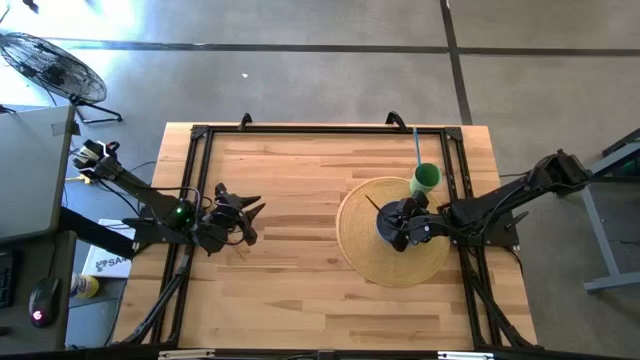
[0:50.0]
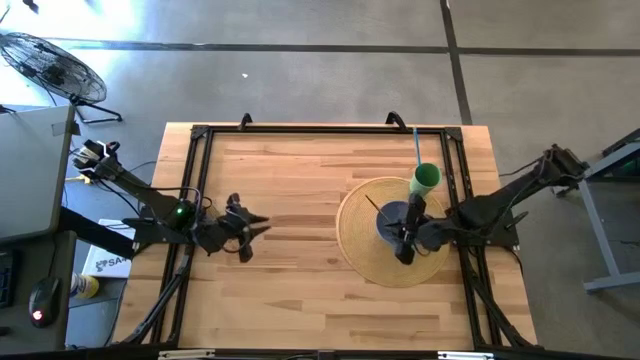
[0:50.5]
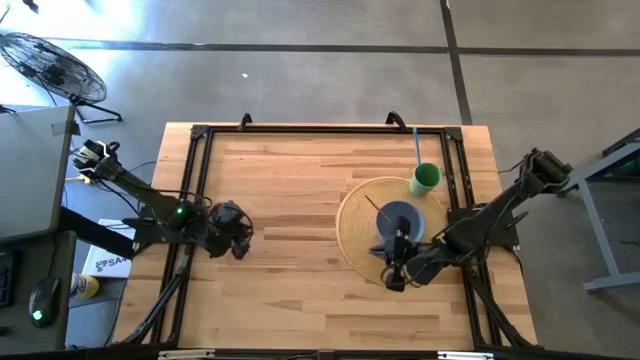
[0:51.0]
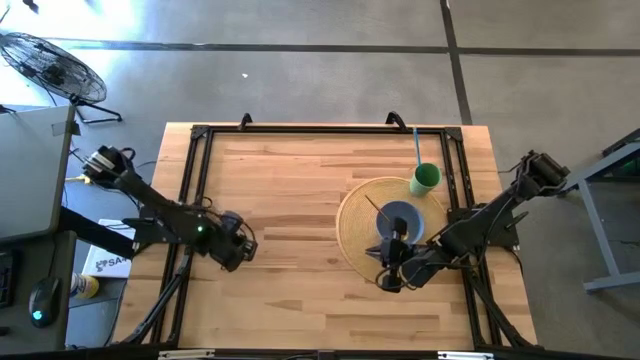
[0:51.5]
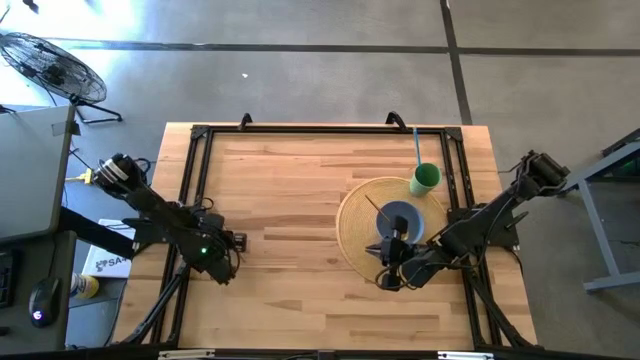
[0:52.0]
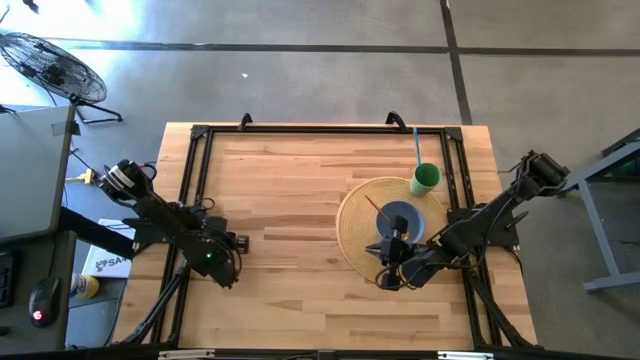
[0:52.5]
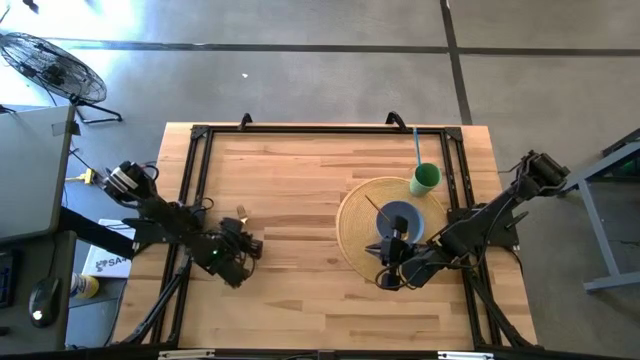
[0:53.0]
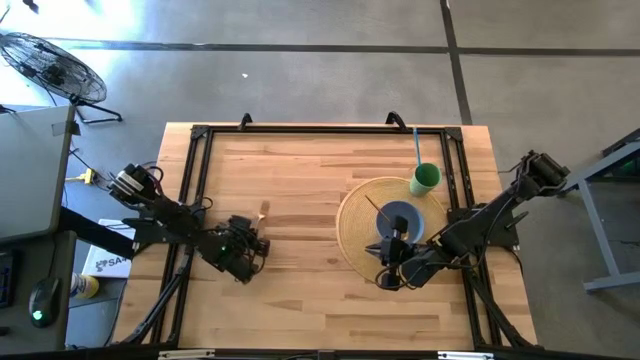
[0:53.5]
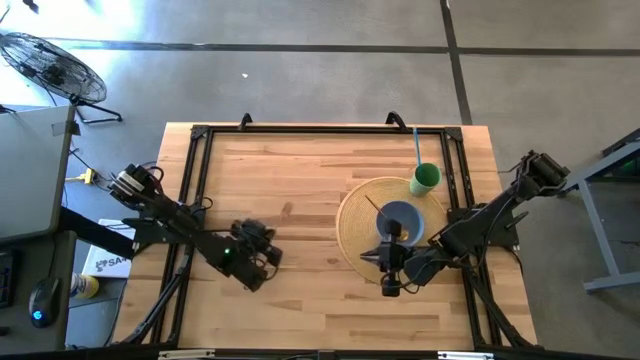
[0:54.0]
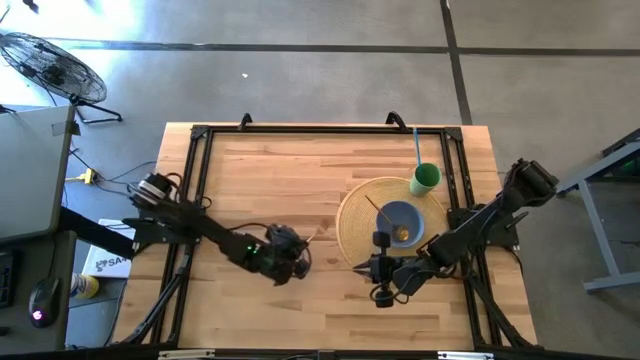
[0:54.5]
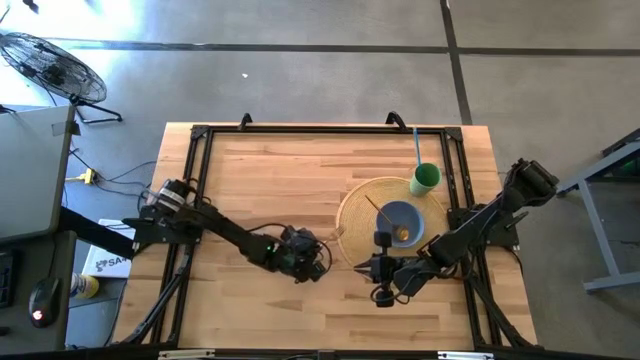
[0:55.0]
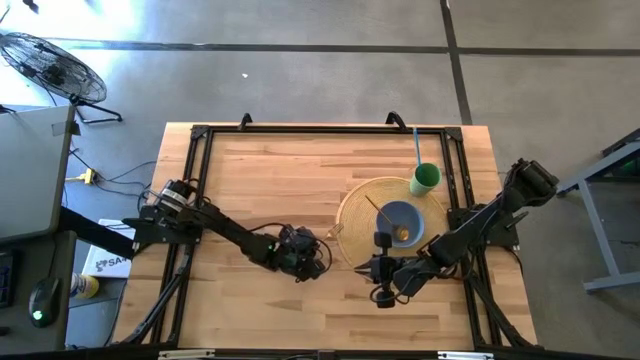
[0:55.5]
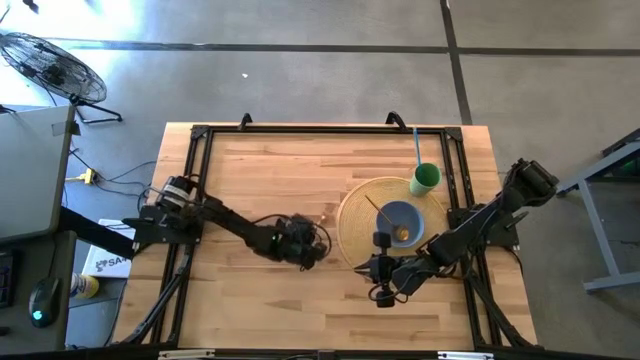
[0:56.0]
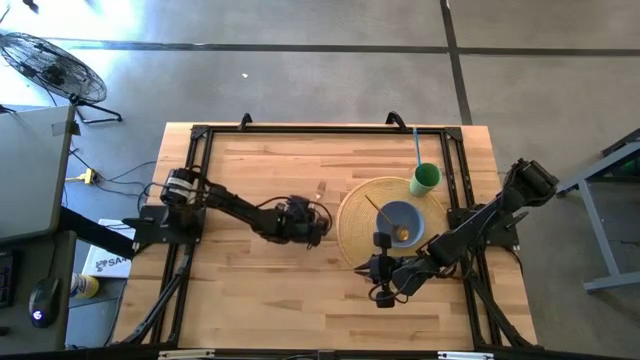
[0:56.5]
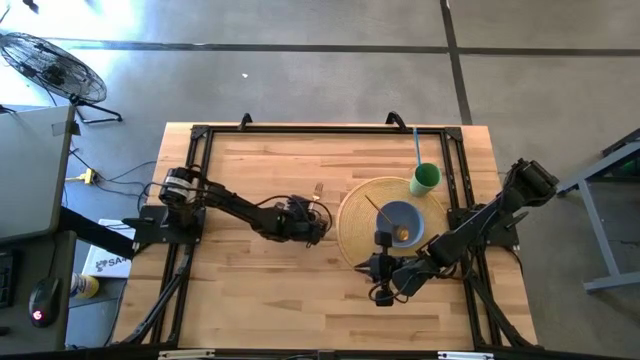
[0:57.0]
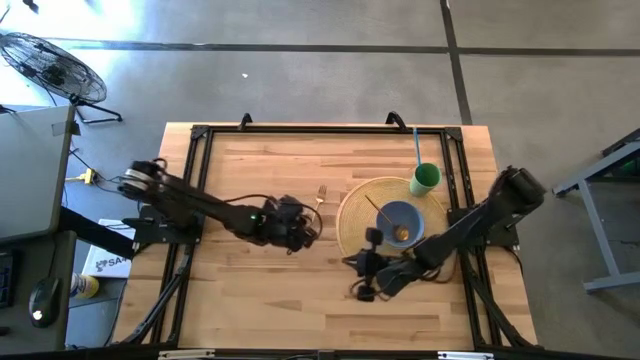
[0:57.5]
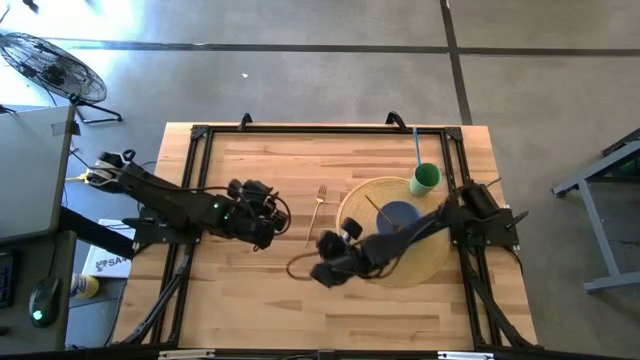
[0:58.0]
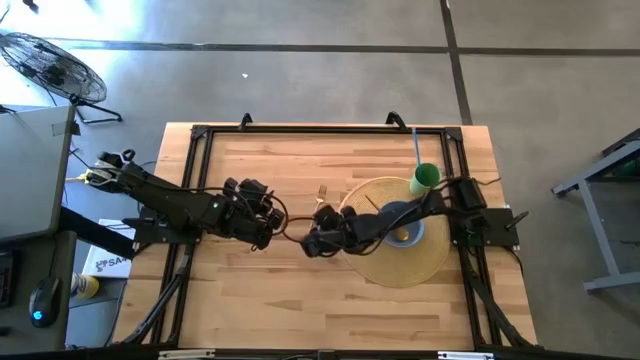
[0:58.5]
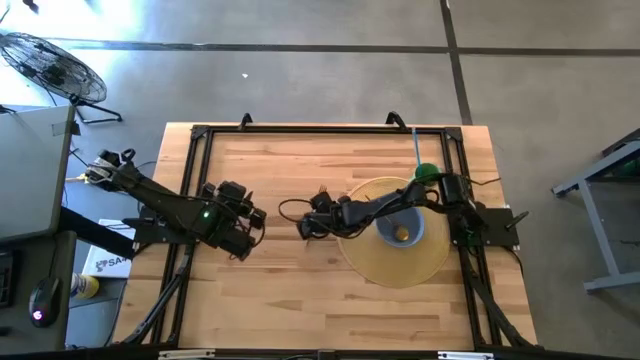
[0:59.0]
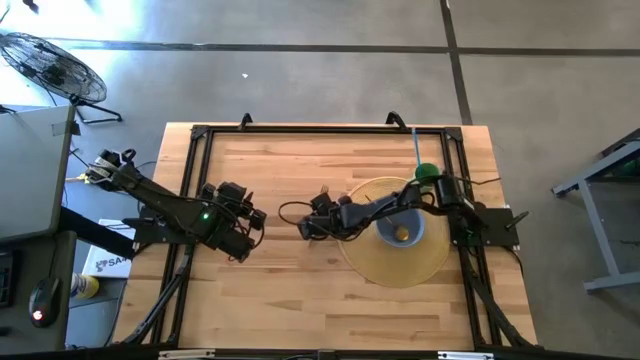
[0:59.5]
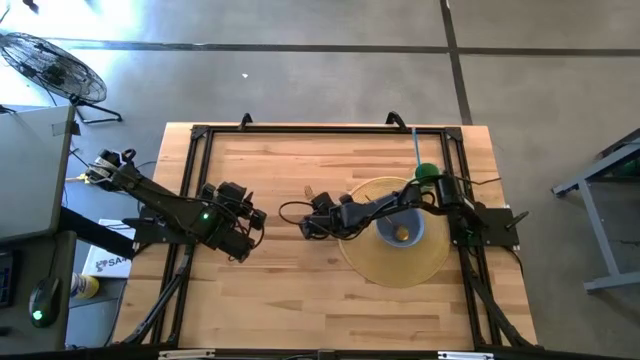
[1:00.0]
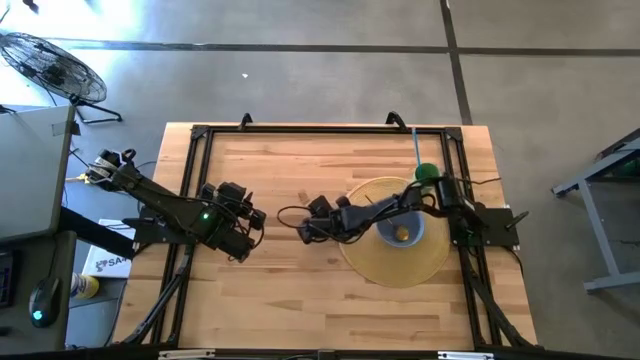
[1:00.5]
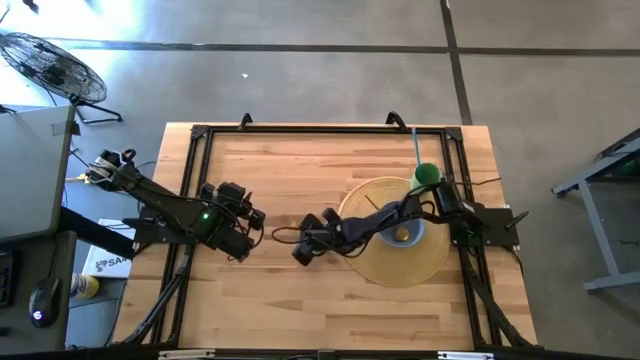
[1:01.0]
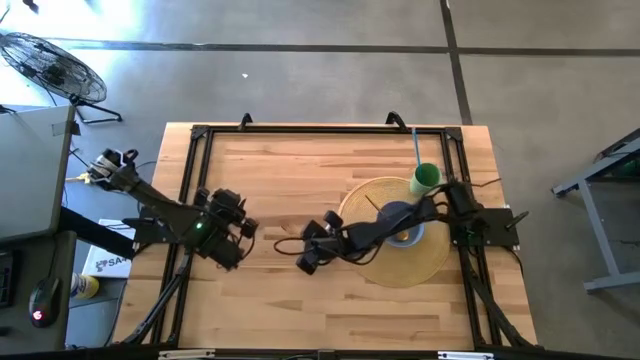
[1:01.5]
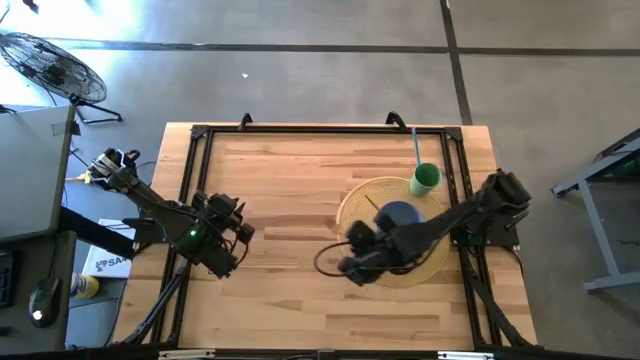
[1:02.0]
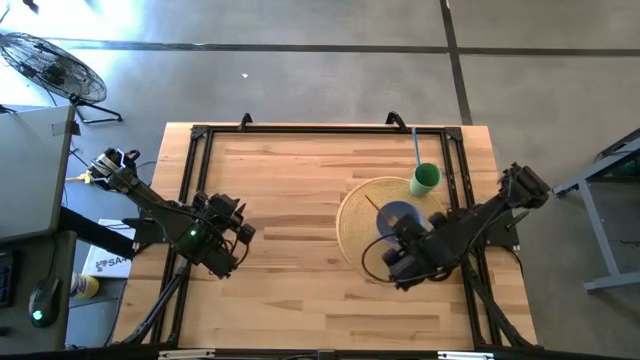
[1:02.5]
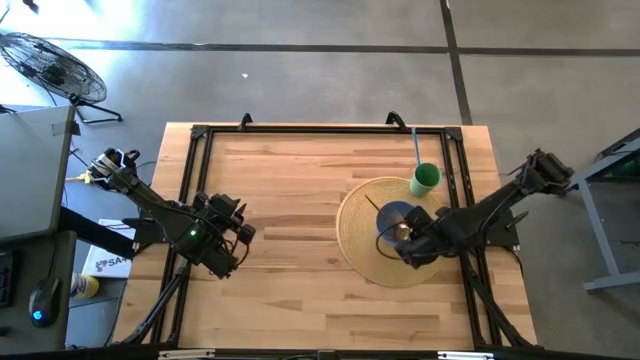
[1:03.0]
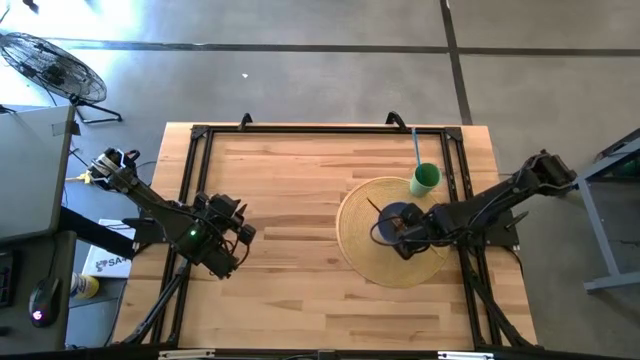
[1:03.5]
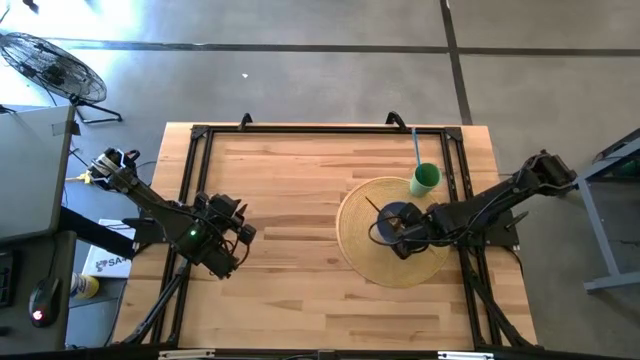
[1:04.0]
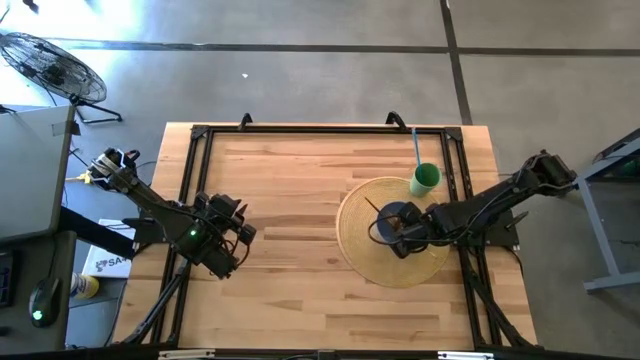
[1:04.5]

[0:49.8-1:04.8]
Task: Pick & Place Utensil
Put the fork into the blue bowl

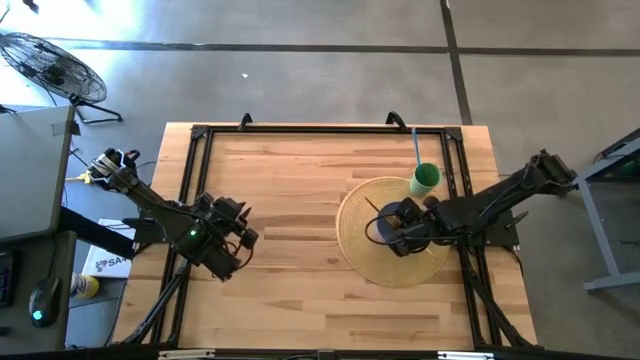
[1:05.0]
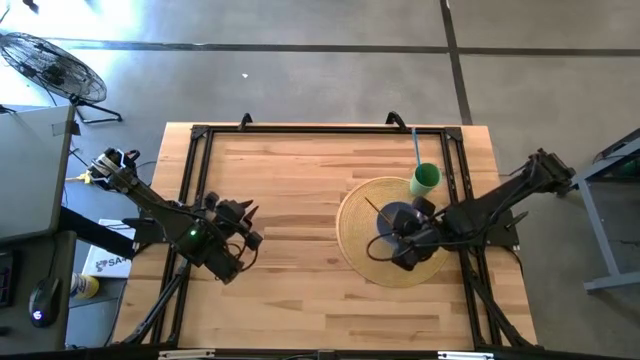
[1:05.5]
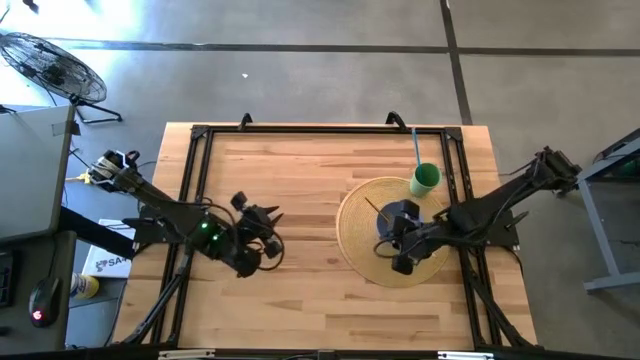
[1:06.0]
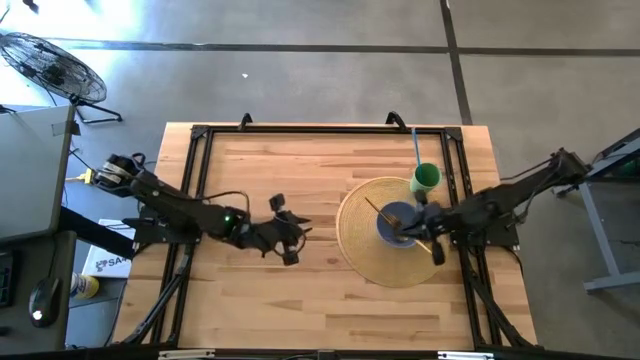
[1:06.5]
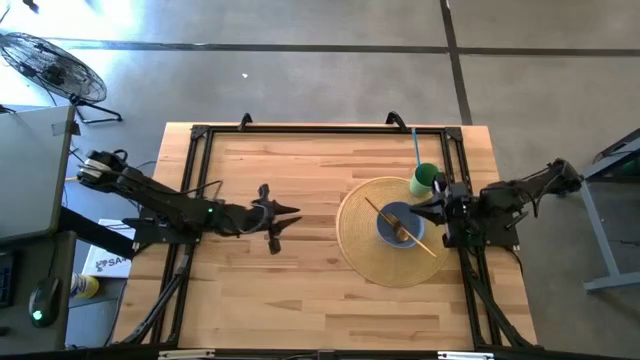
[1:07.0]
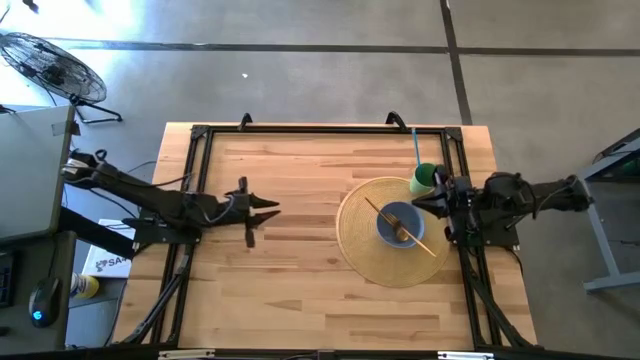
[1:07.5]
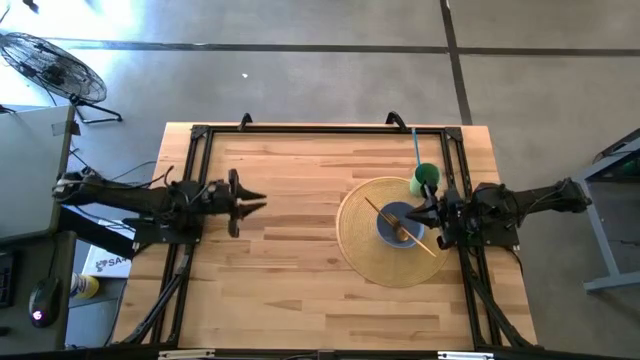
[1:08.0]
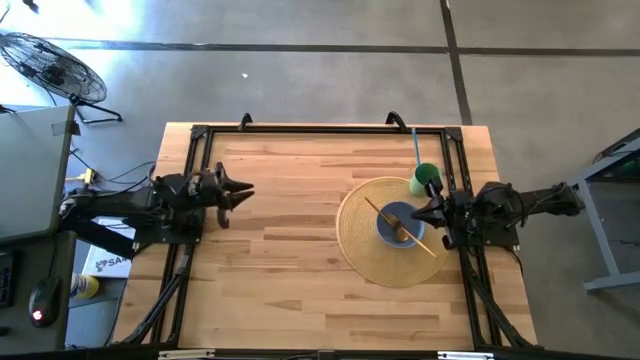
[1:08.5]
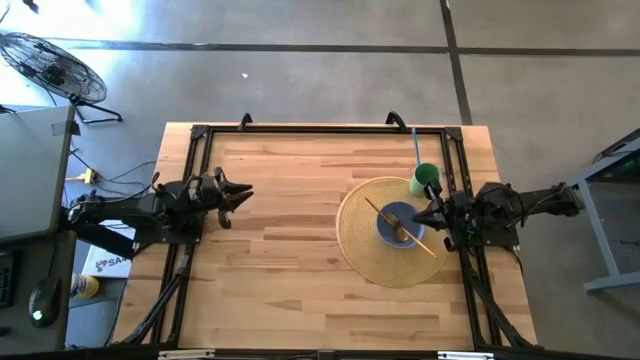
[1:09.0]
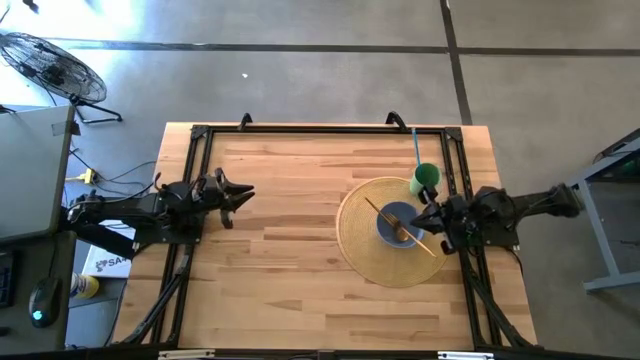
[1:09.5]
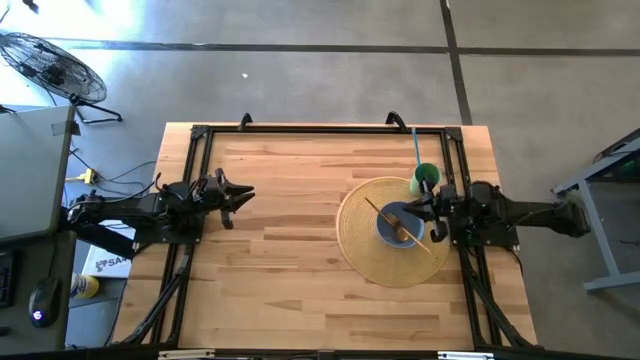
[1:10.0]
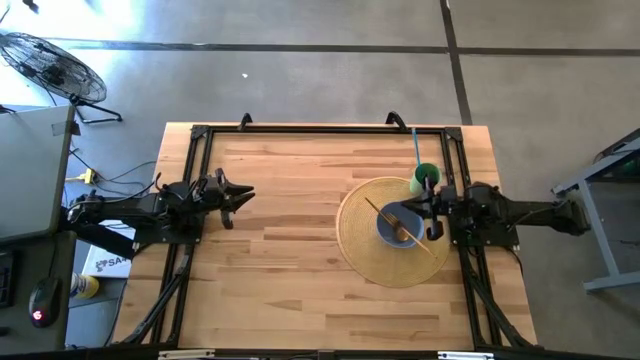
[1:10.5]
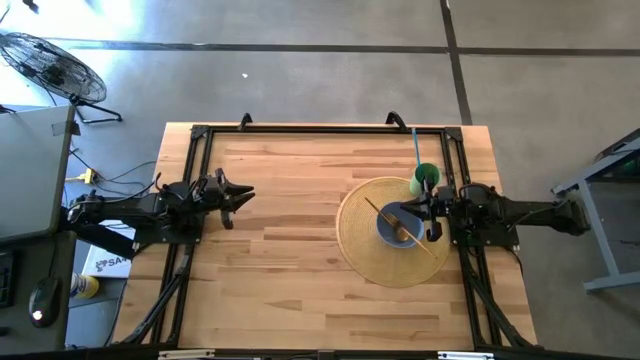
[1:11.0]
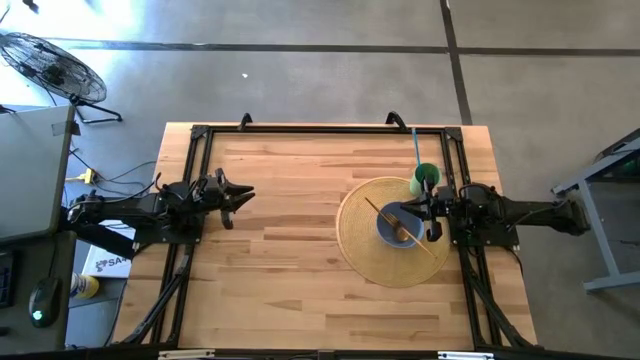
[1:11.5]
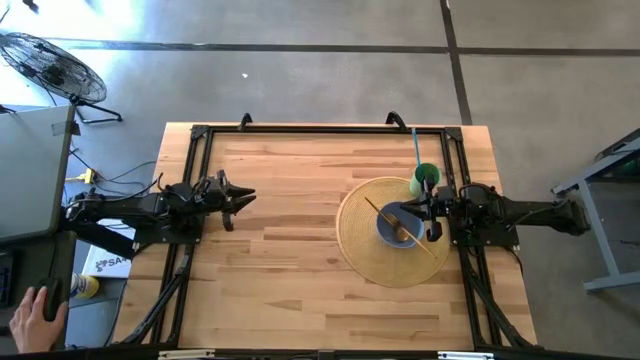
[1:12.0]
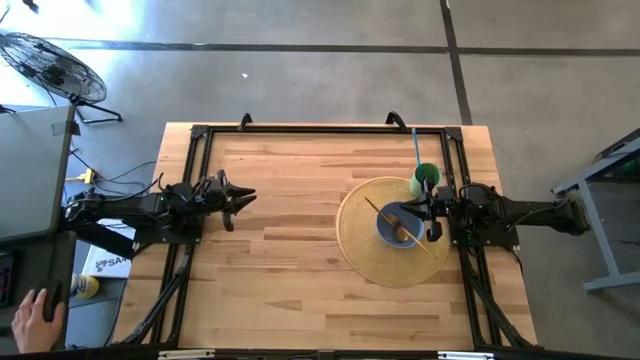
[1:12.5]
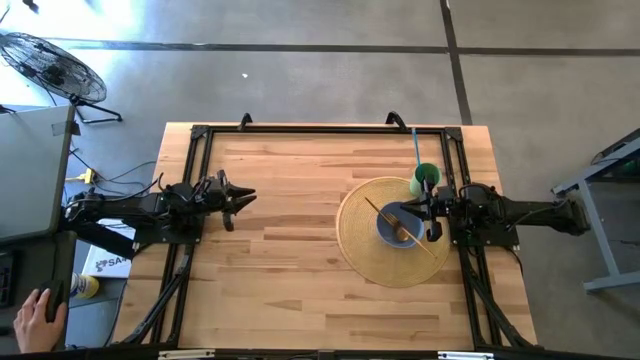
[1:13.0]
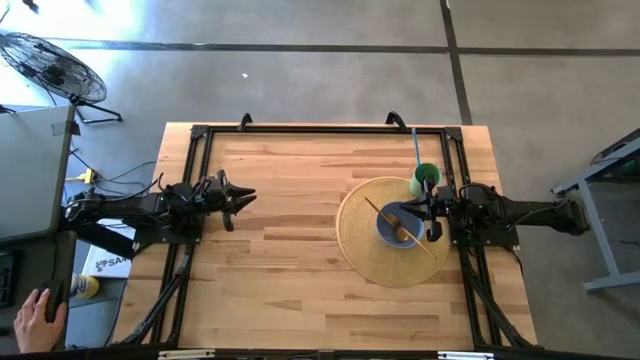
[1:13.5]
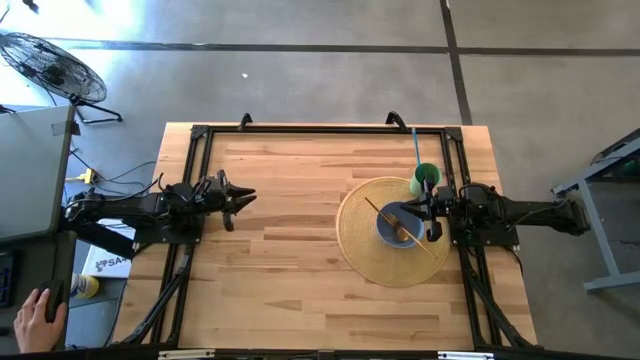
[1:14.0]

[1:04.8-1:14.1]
Return to Home Position
